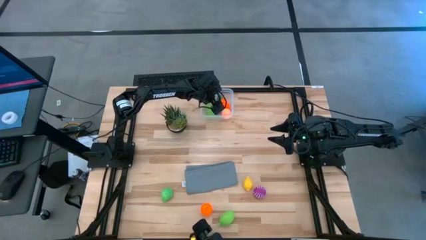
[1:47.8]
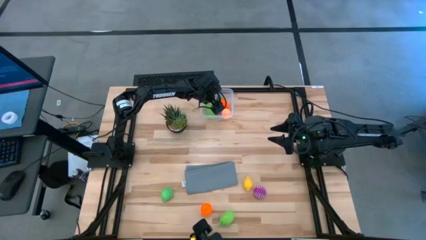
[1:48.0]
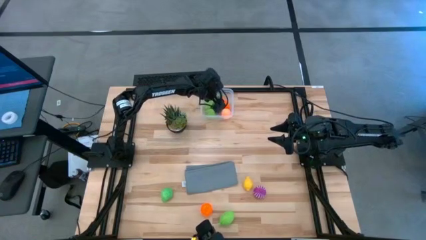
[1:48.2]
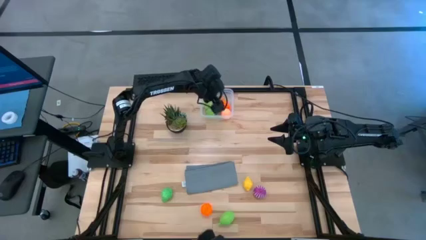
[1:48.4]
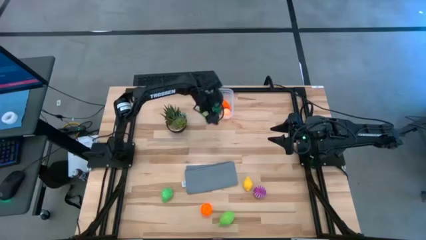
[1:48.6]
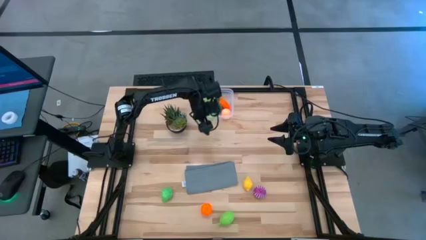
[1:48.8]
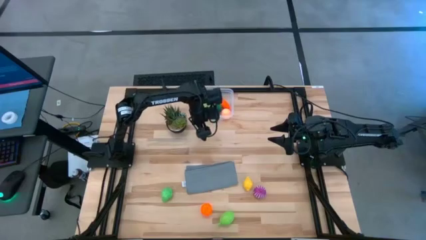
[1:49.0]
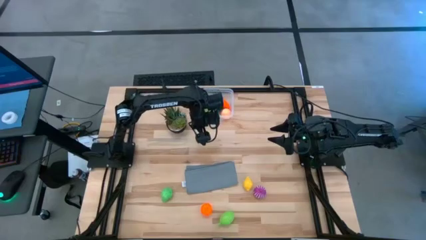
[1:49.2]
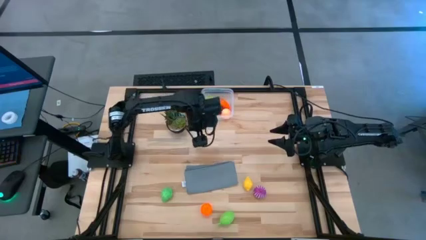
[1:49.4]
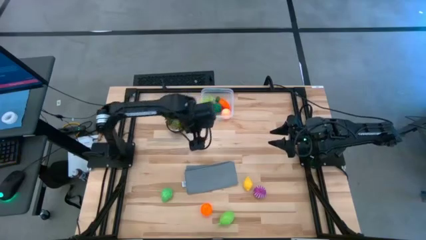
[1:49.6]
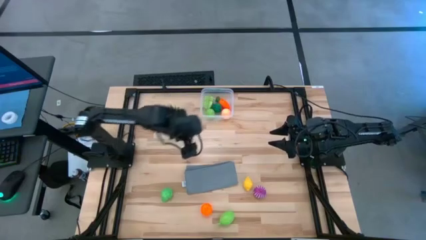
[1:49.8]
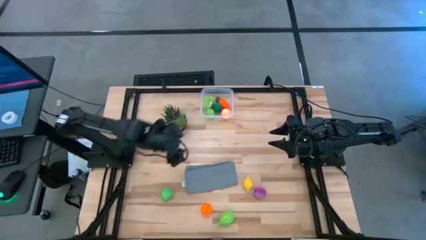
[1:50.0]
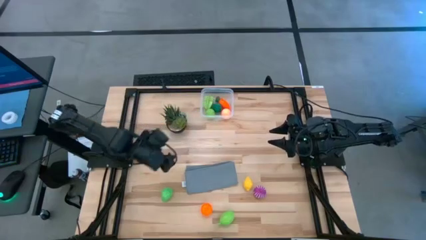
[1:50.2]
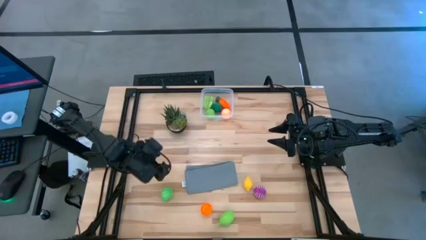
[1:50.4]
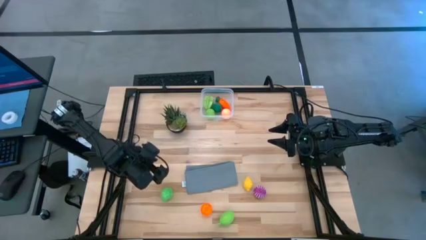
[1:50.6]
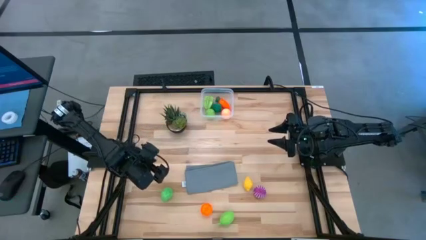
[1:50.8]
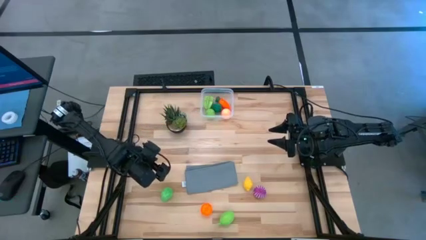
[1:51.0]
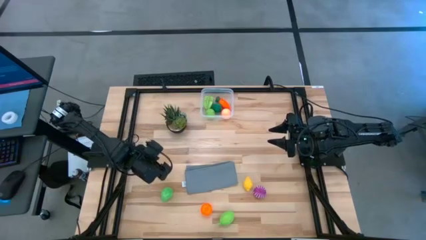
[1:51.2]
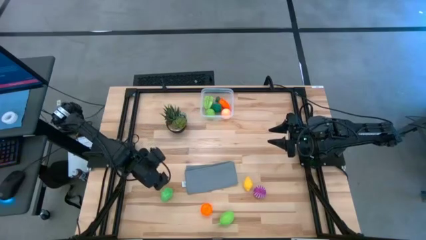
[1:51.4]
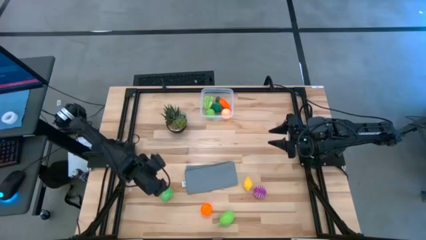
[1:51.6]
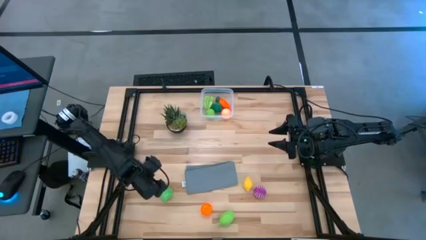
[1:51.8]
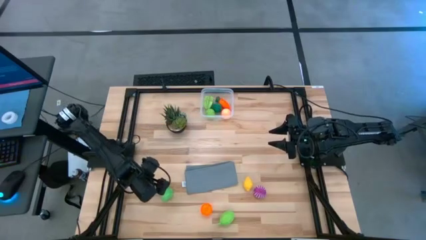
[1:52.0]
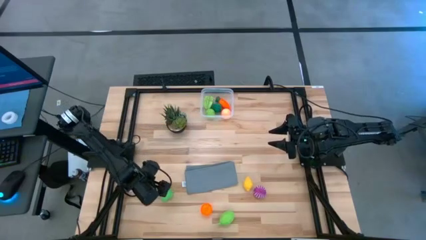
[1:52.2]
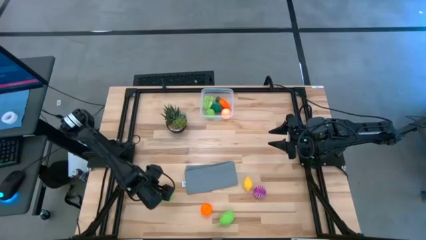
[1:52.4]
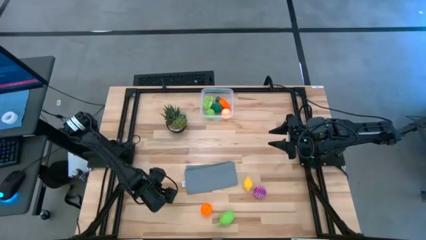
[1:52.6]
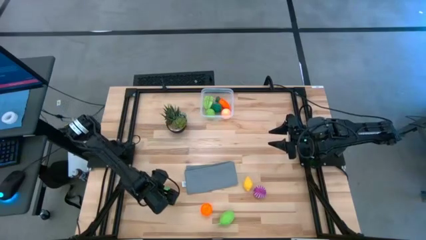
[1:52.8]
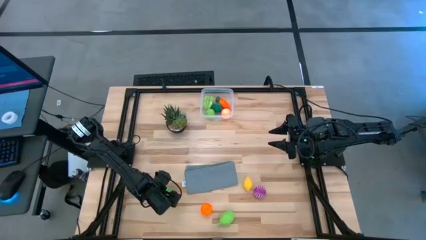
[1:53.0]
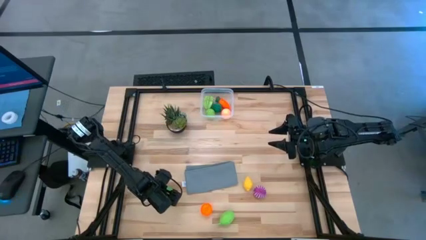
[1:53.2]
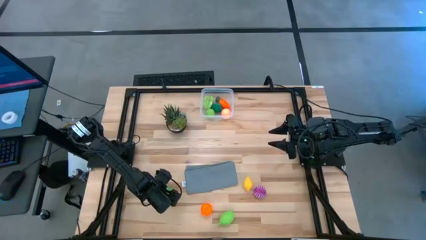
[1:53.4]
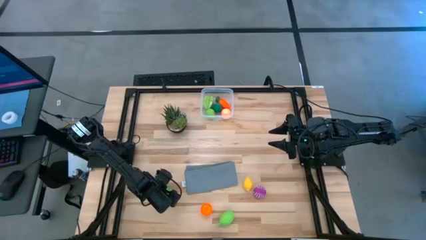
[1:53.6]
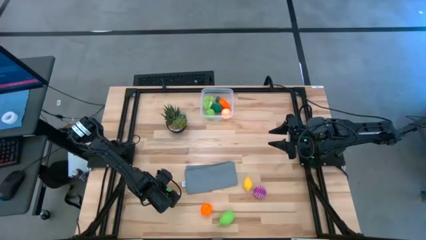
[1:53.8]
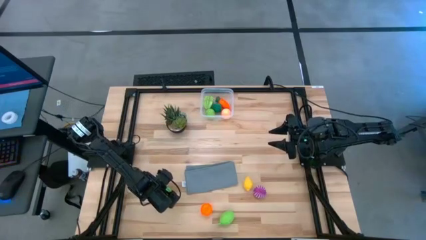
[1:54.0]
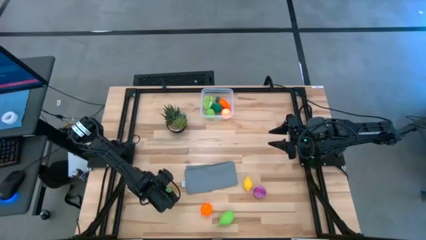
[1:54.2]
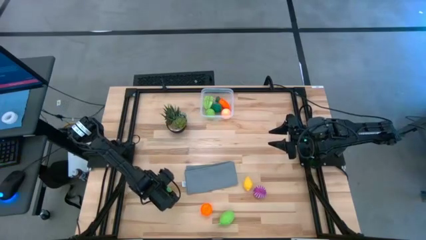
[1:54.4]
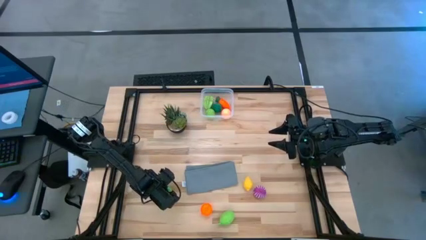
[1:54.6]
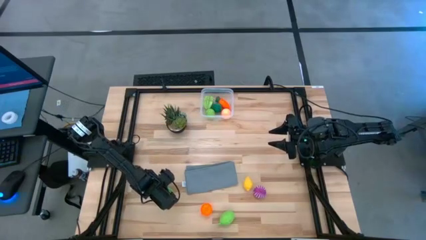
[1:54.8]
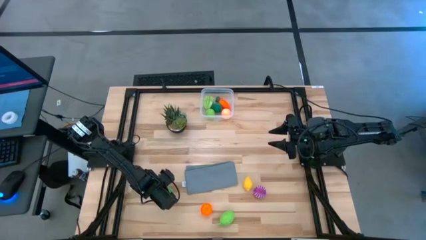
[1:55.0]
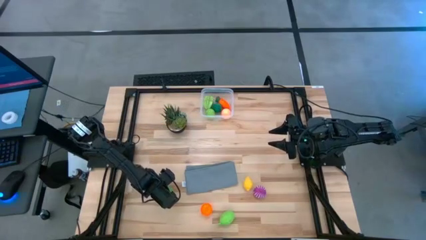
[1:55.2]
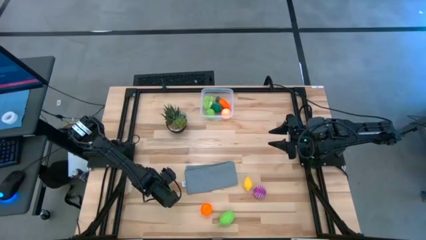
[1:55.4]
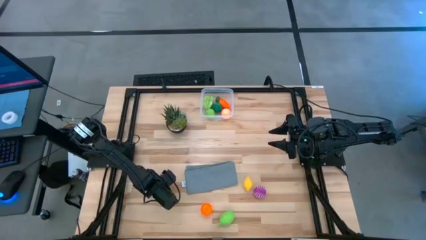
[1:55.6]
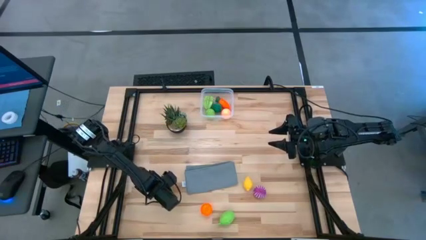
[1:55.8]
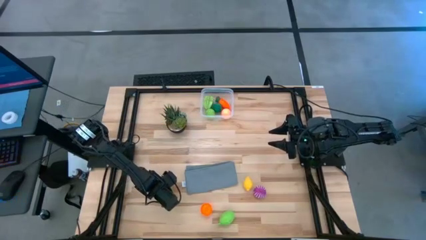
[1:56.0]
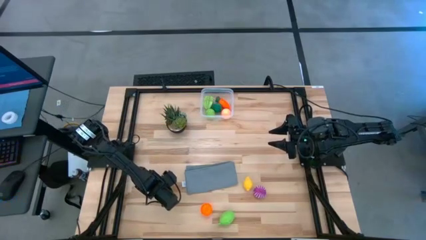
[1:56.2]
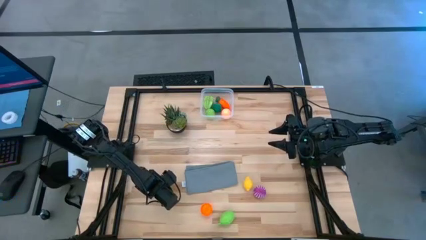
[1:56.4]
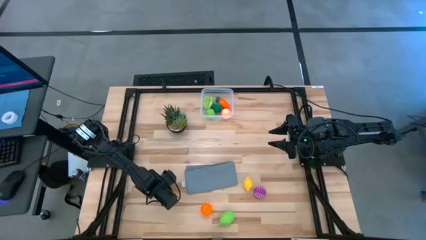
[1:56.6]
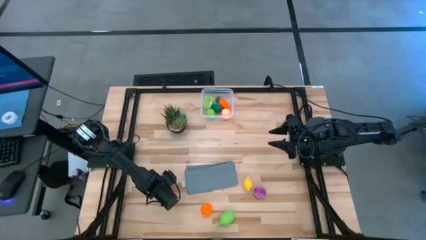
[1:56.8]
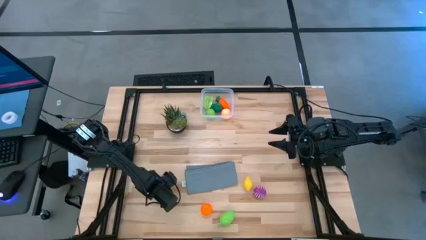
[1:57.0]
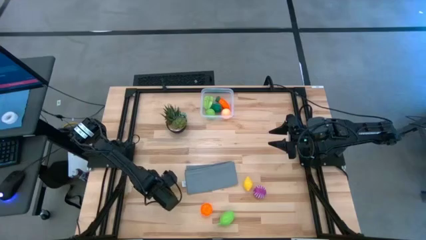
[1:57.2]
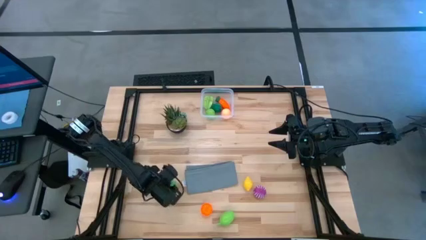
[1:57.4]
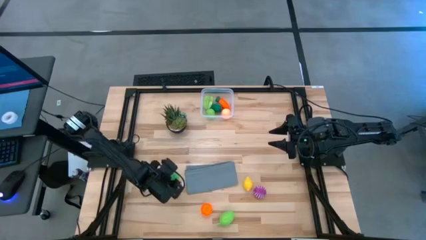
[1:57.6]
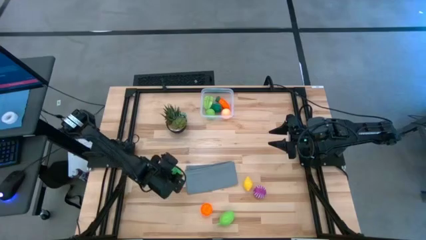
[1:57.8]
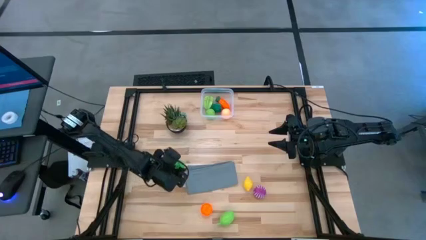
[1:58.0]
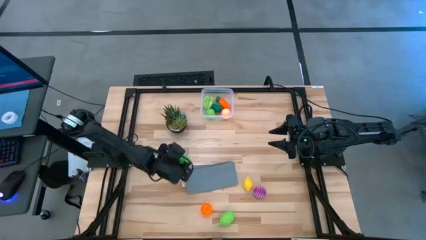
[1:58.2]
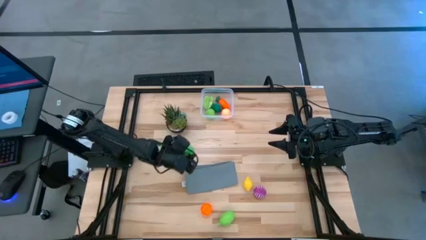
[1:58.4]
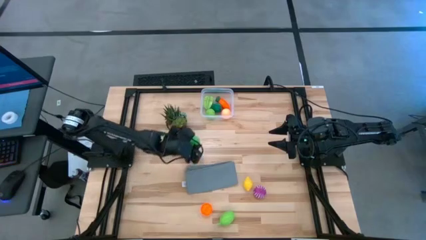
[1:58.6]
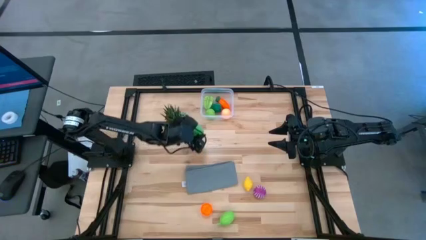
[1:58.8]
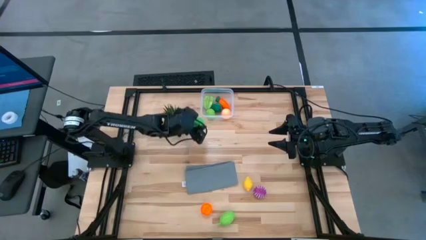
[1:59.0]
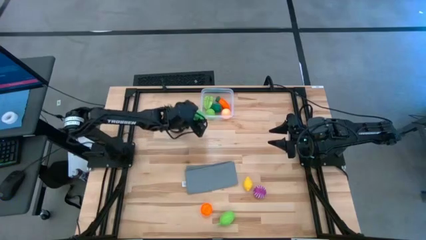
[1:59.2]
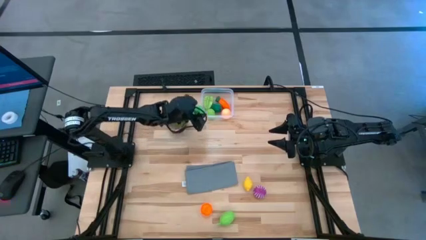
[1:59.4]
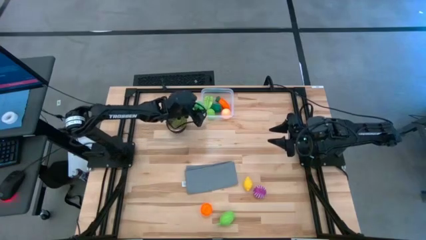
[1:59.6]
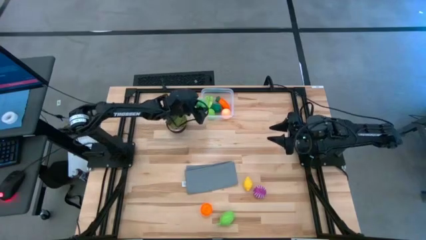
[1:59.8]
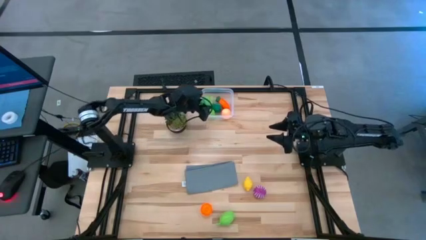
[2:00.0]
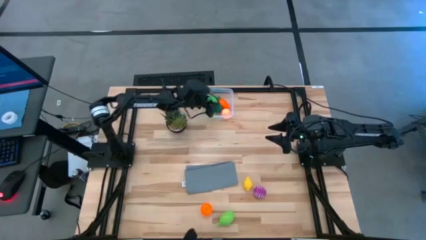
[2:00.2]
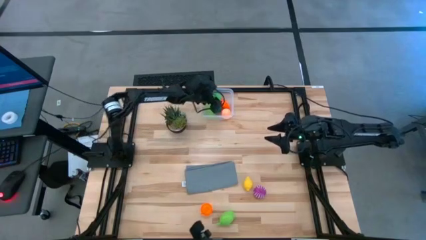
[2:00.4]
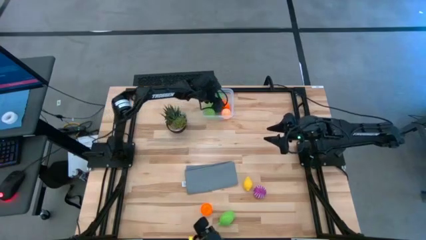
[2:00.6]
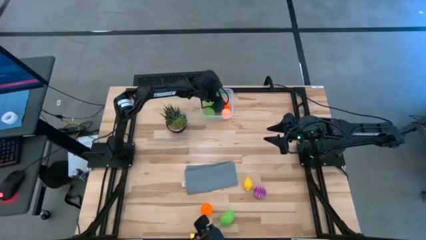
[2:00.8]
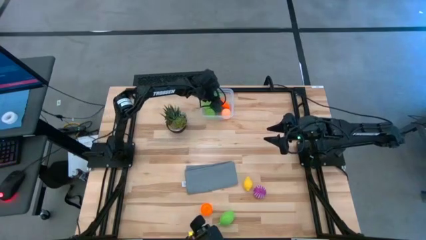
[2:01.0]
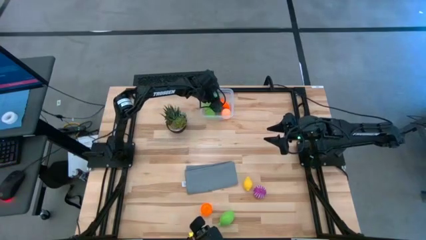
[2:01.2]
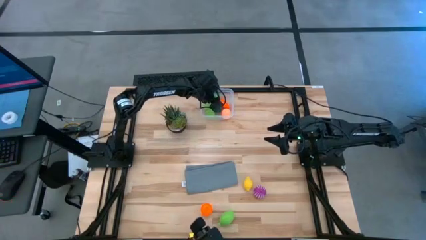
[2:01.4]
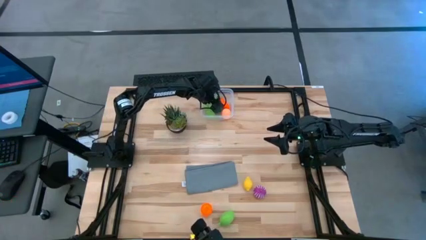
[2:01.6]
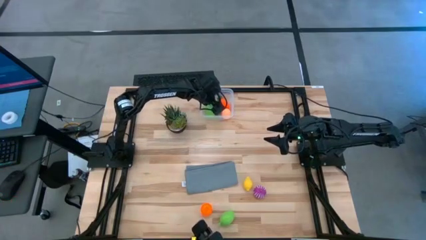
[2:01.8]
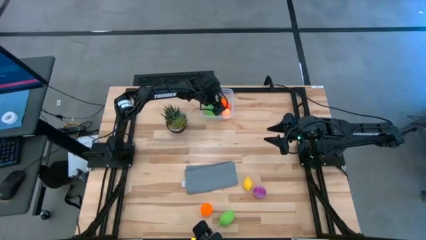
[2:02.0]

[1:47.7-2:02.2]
Task: Pick and placing Produce into tupperware
Put the pear into the bin

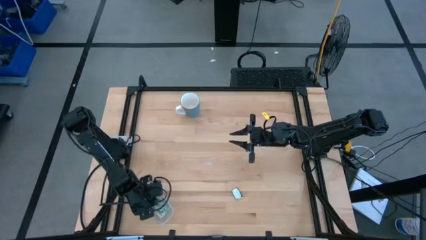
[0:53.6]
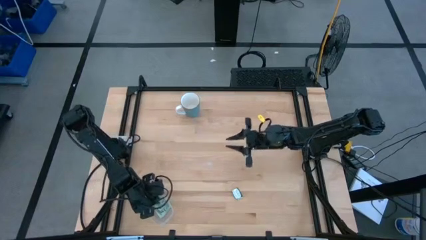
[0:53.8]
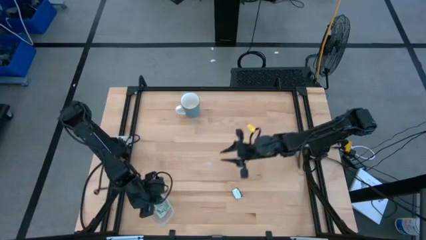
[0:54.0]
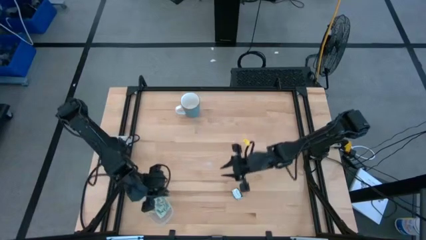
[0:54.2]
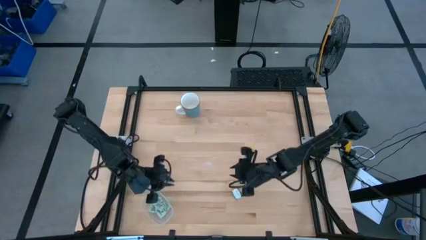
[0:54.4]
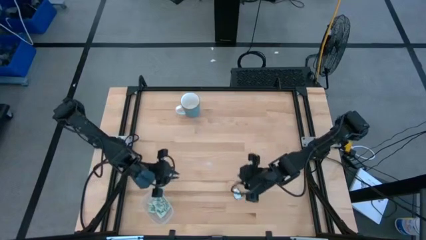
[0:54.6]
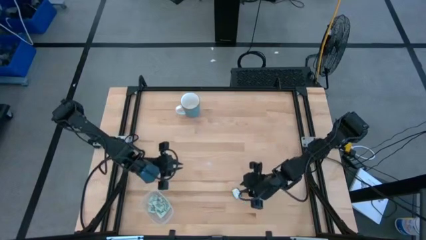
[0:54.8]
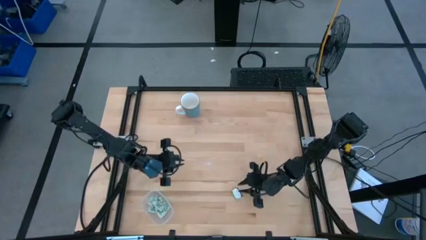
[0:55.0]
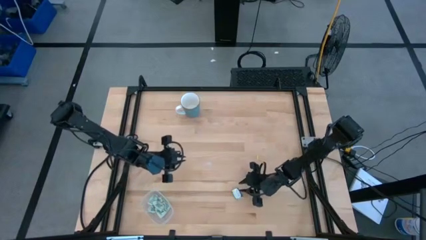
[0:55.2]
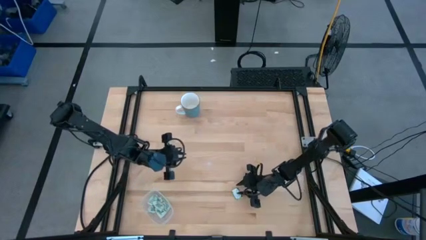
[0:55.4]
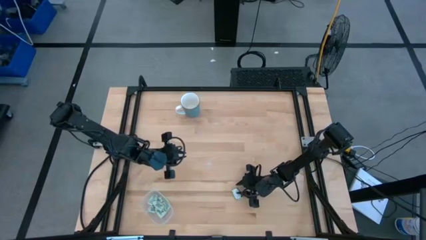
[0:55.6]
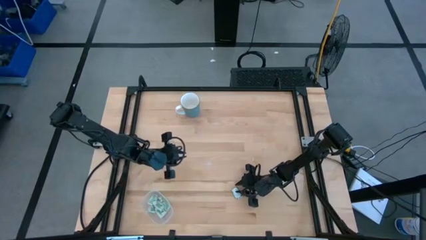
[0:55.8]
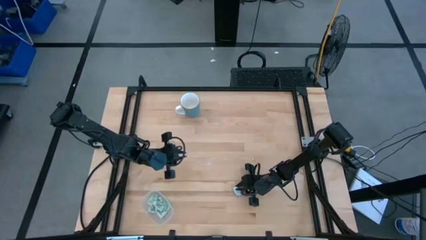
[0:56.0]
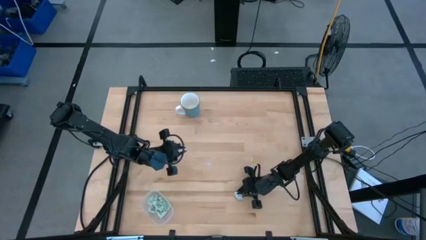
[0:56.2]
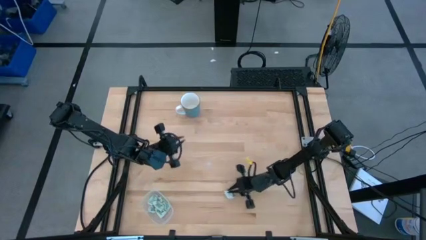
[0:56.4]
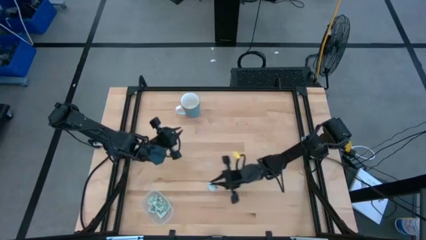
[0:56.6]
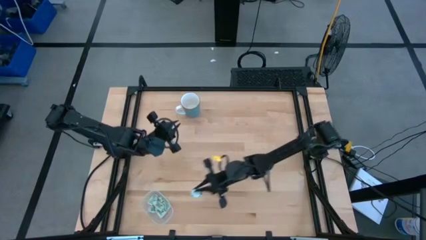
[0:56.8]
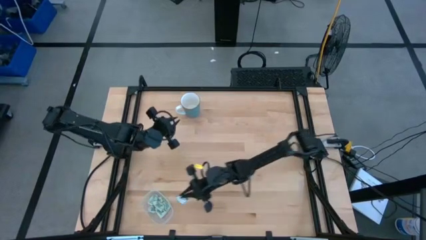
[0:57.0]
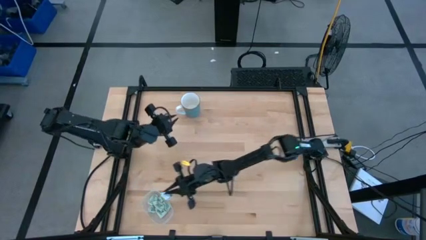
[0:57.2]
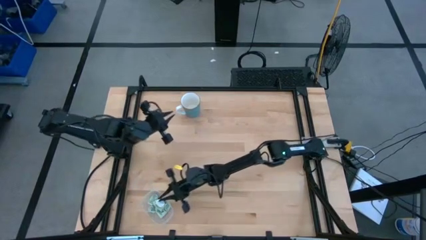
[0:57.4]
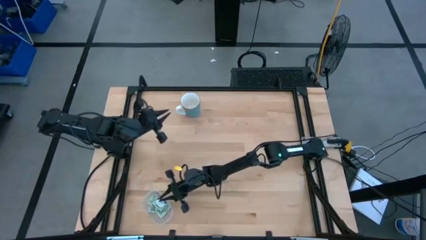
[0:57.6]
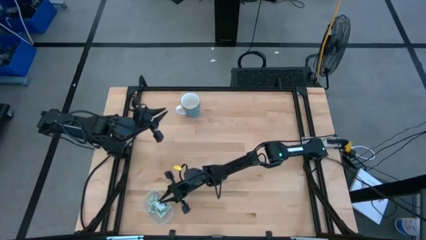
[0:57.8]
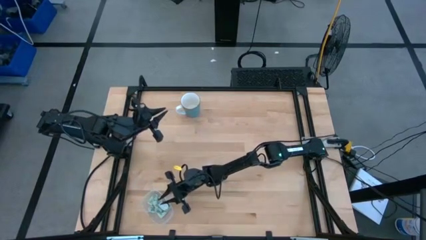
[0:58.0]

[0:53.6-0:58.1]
Task: Pick and place Stevia / Truvia into bins
Put the truvia packet into the transparent container
